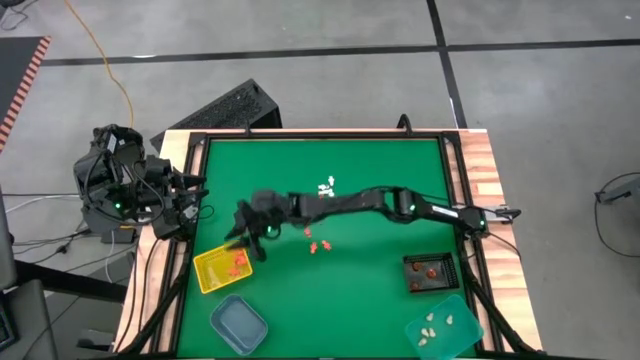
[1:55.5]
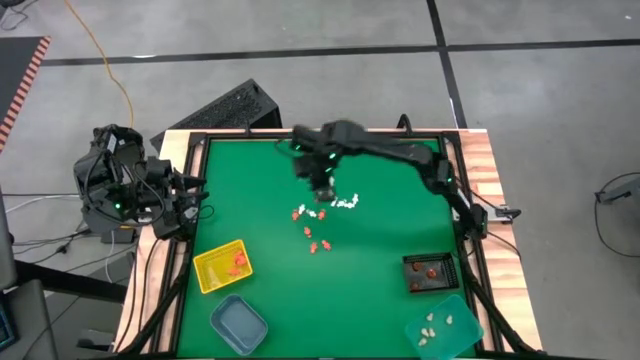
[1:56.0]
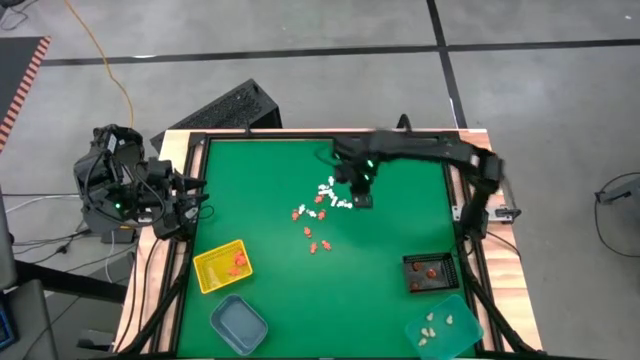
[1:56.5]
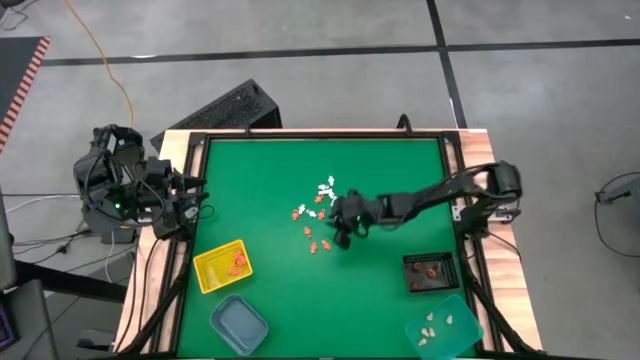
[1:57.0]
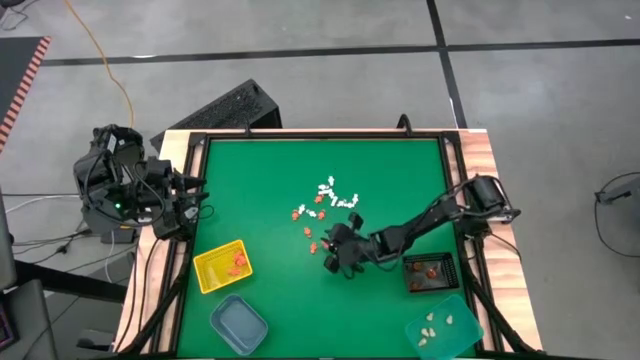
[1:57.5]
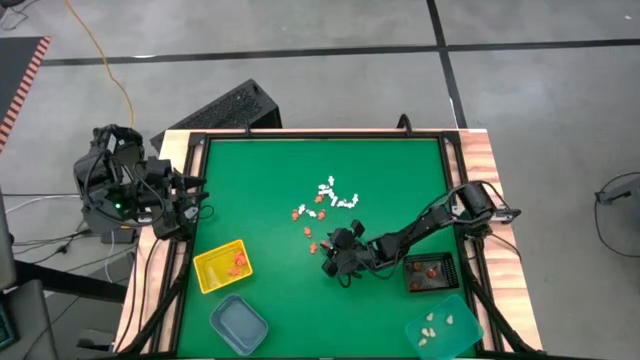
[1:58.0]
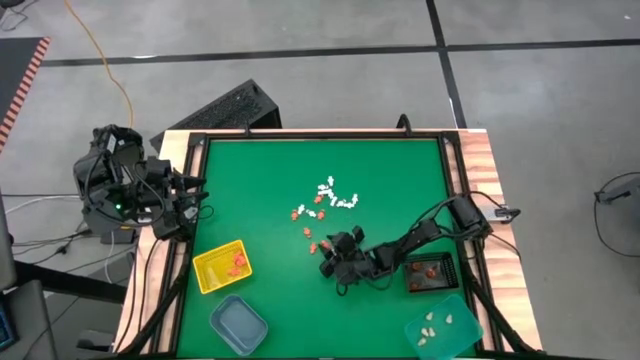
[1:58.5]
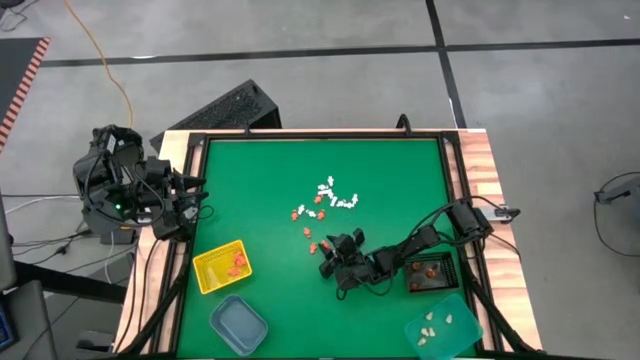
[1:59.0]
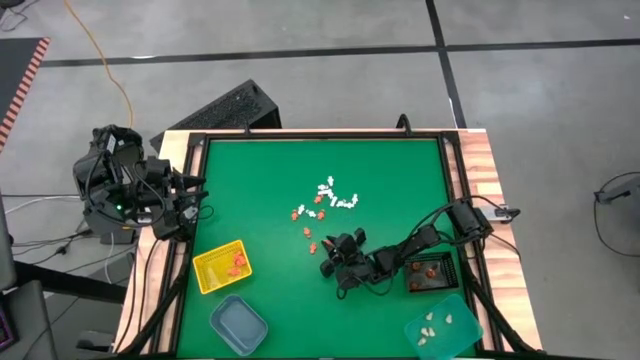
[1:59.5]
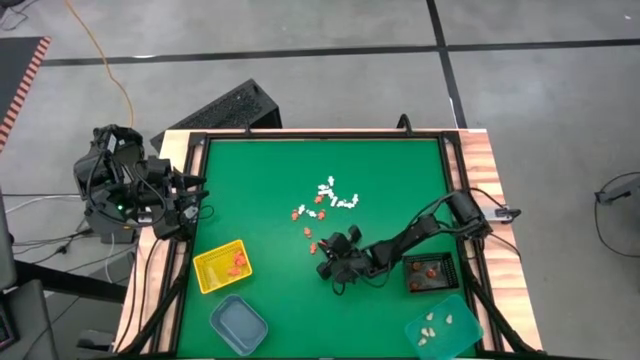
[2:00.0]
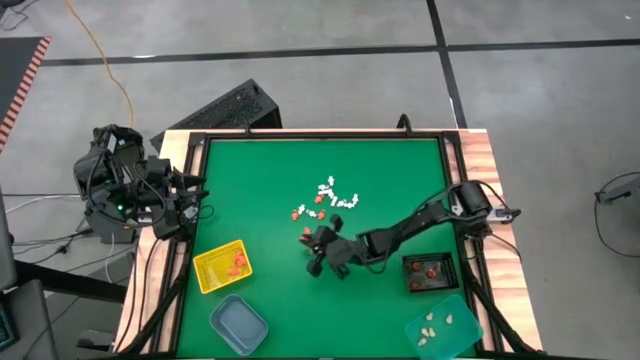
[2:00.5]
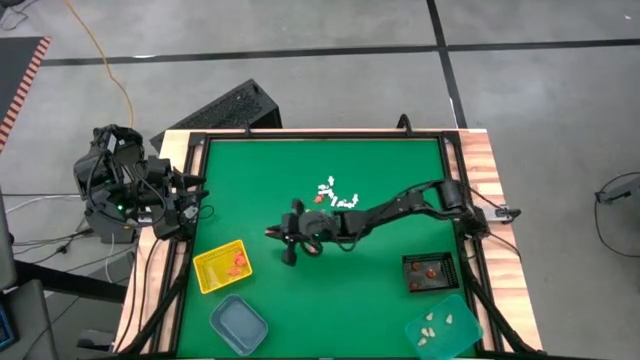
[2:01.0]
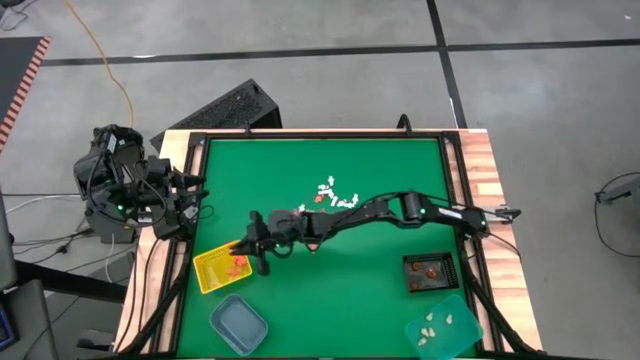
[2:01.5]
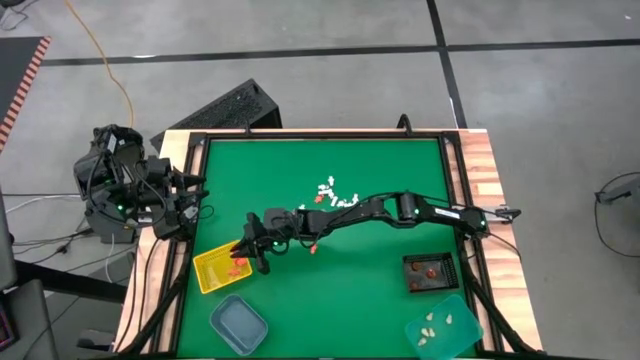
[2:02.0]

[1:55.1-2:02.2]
Task: Sort Halloween decoration
Put the orange skeleton model into the yellow bin

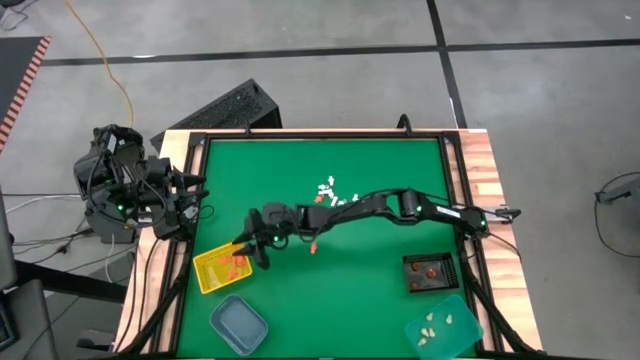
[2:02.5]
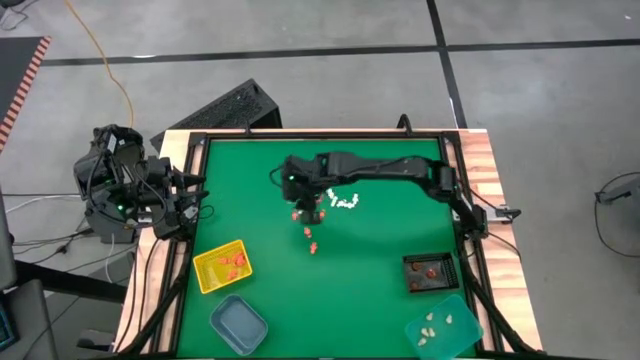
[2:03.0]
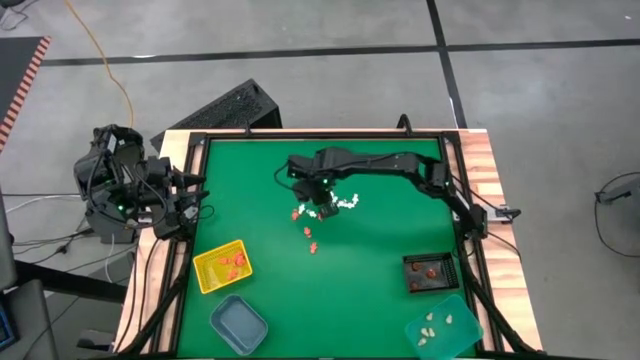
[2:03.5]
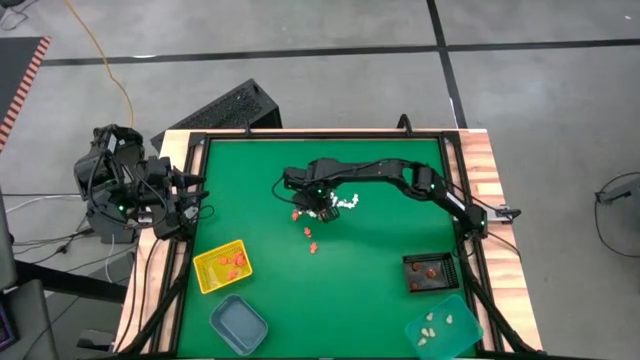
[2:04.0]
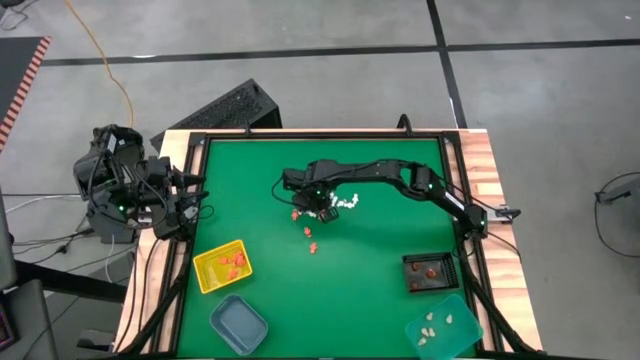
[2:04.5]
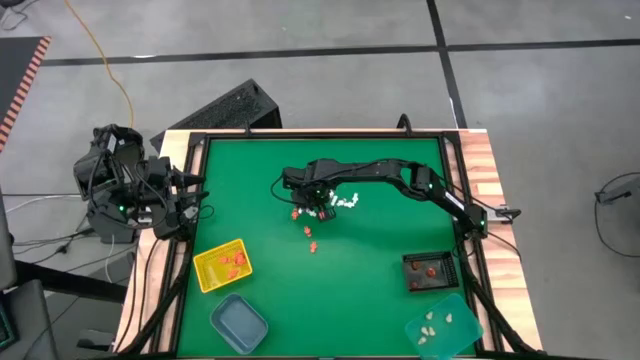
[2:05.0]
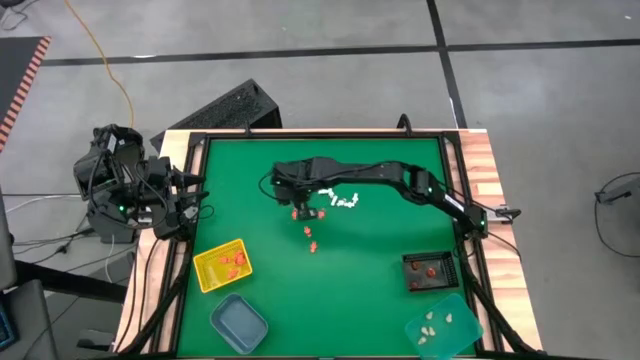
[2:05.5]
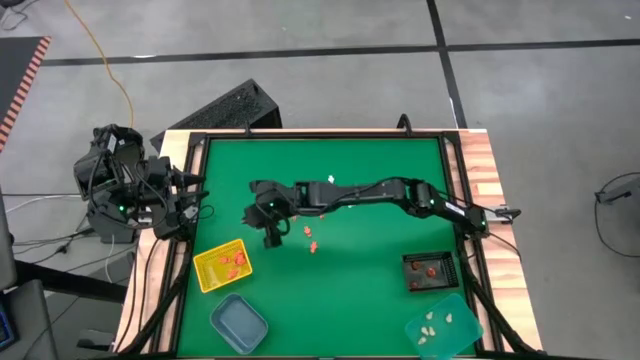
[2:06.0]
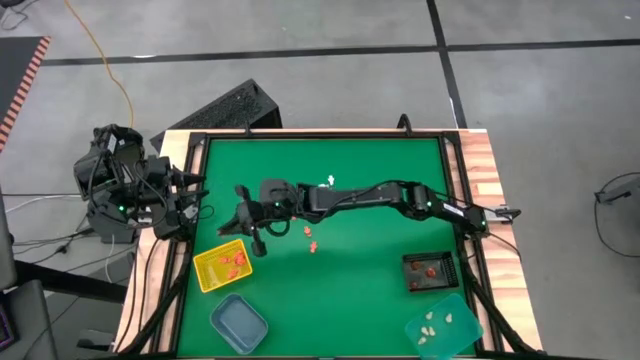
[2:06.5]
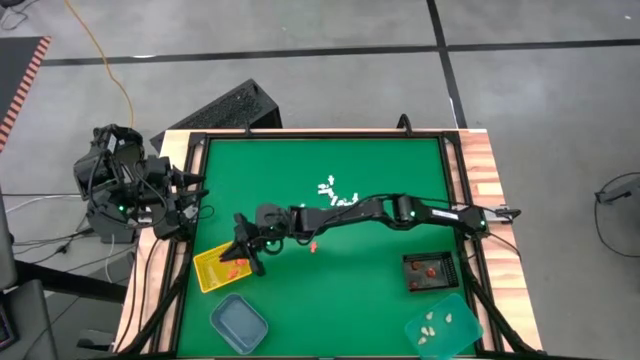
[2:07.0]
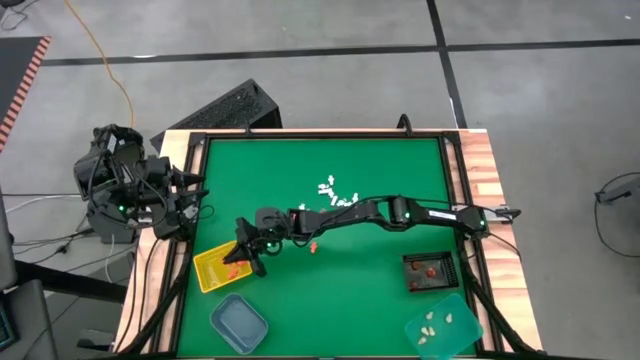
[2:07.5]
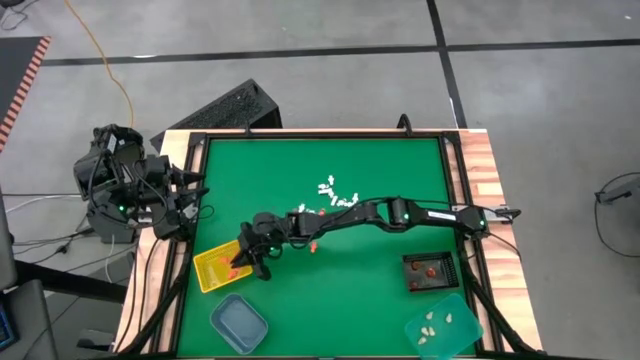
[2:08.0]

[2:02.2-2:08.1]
Put the orange skeleton model into the yellow bin

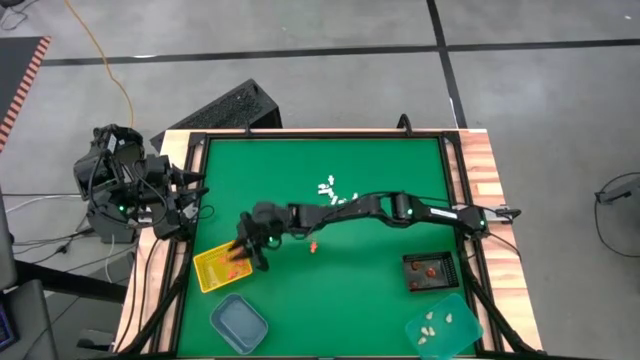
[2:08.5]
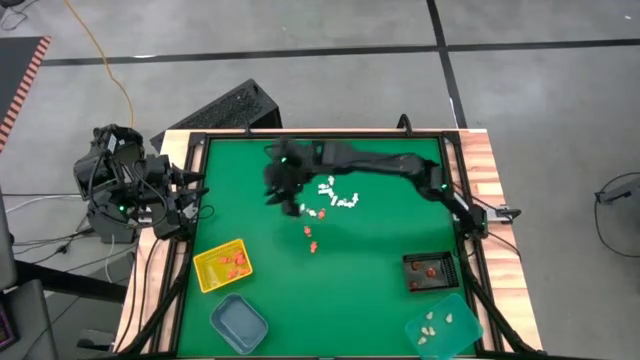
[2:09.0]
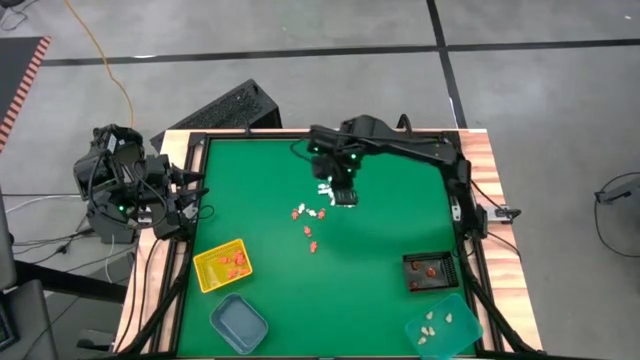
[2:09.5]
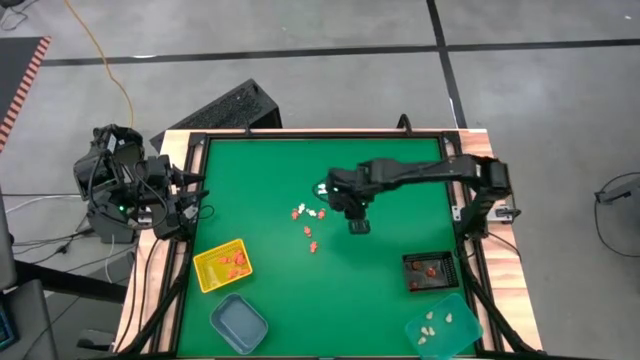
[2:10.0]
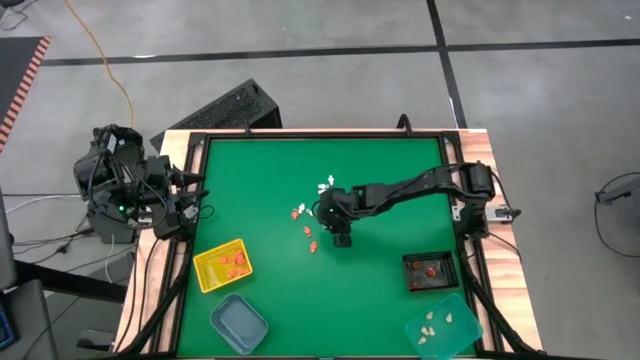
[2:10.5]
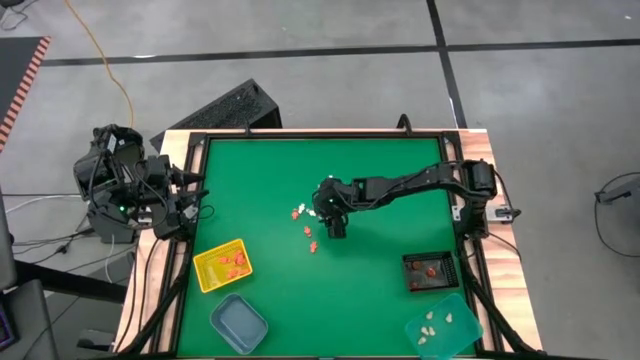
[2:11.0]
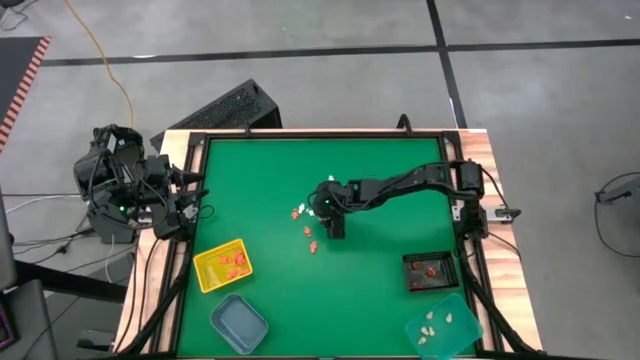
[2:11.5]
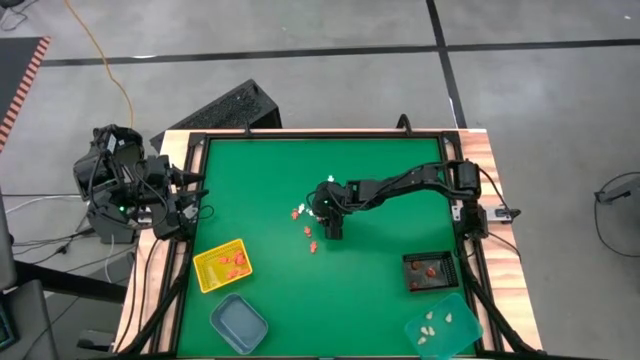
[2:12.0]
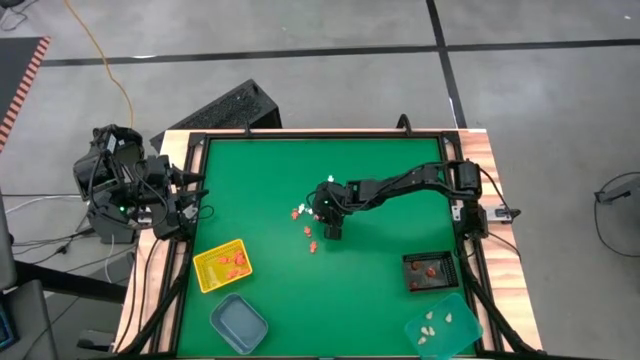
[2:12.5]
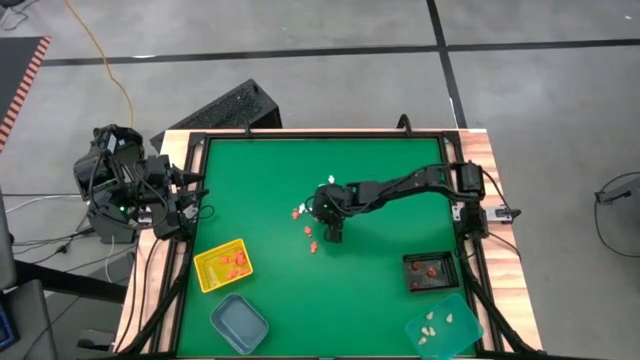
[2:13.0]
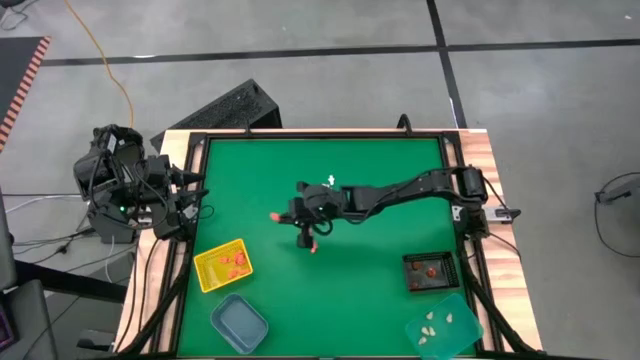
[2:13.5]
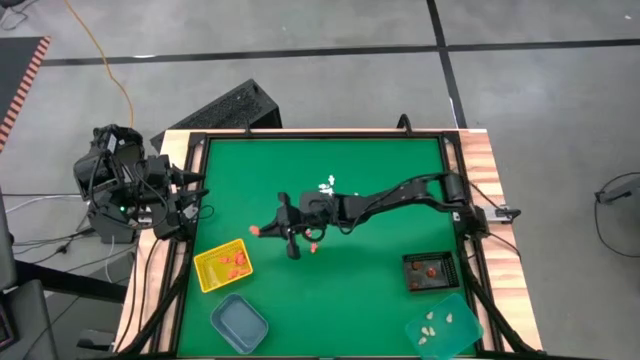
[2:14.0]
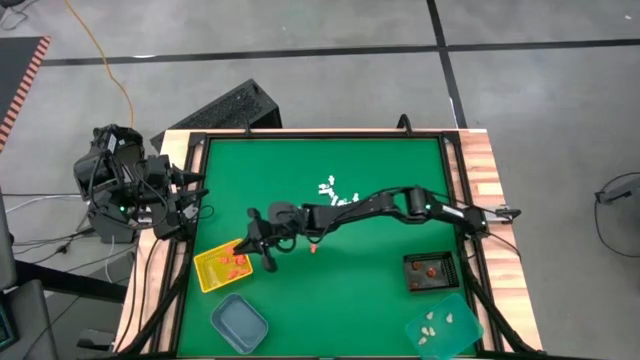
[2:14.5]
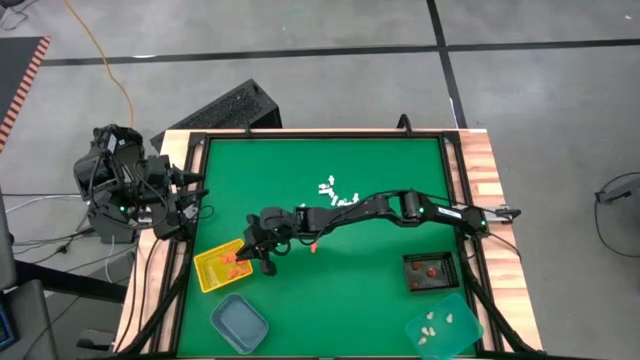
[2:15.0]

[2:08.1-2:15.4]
Put the orange skeleton model into the yellow bin

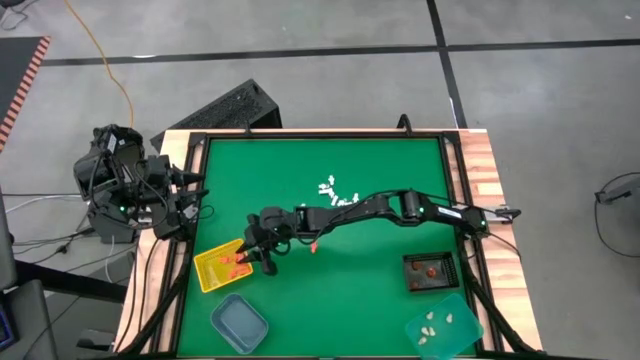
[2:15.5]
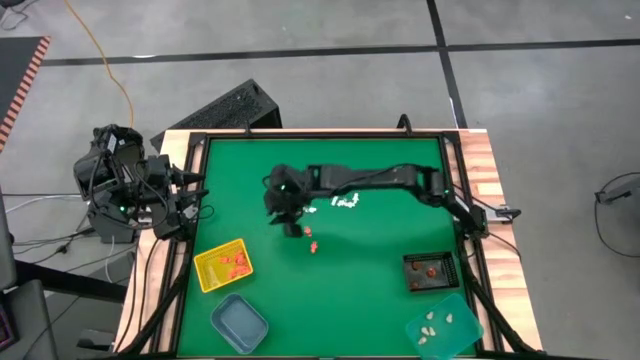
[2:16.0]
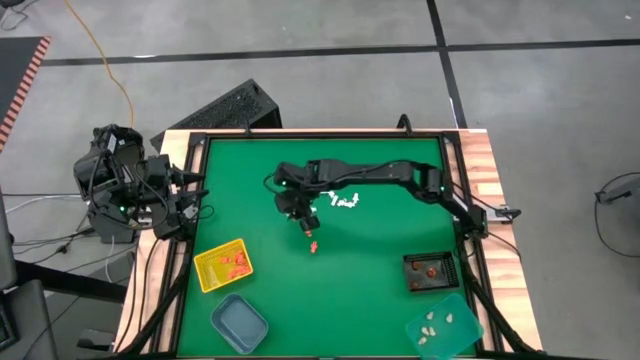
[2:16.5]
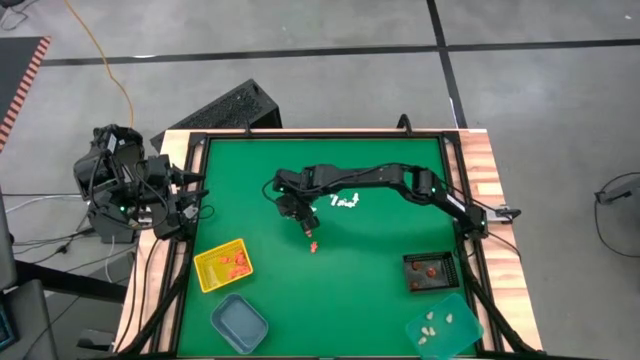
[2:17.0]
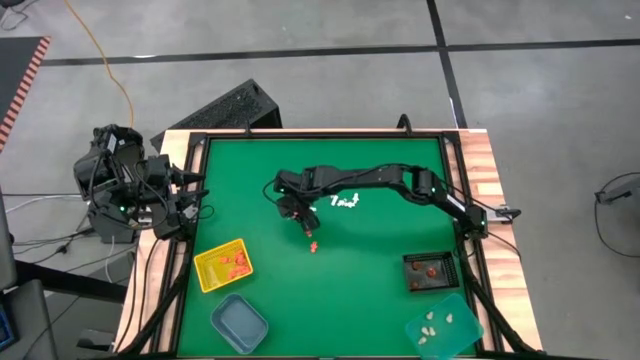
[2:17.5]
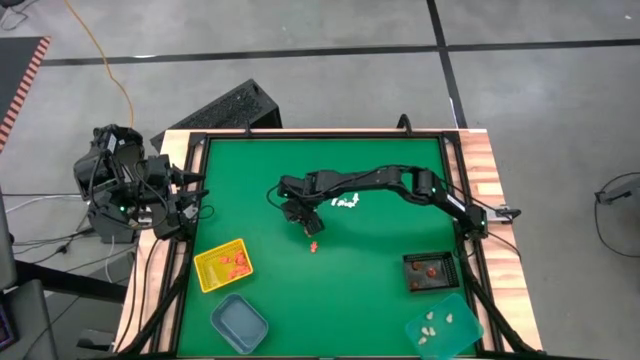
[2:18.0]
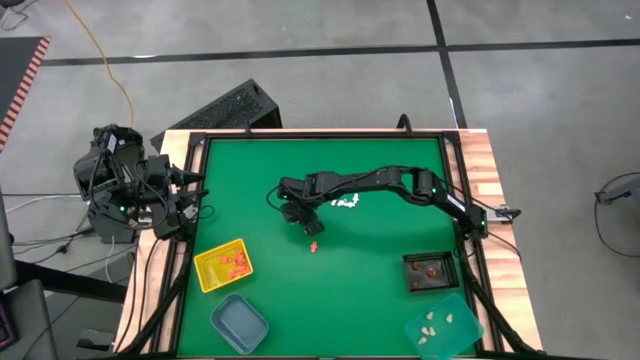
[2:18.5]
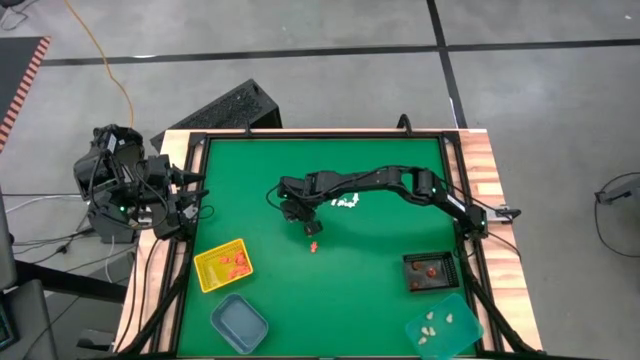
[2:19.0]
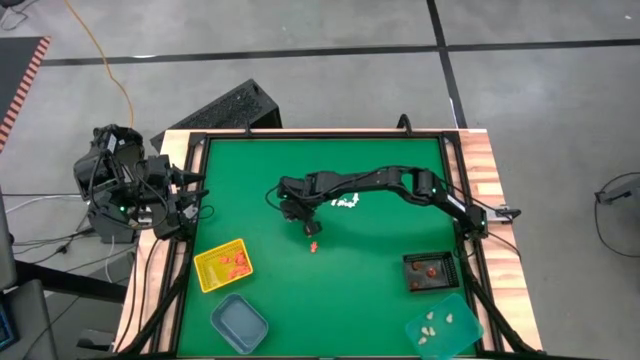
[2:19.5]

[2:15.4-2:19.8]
Put the orange skeleton model into the yellow bin
